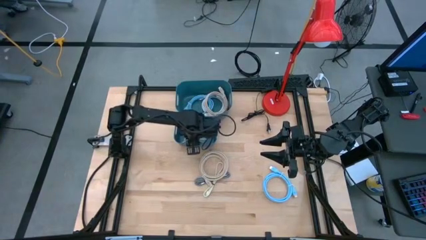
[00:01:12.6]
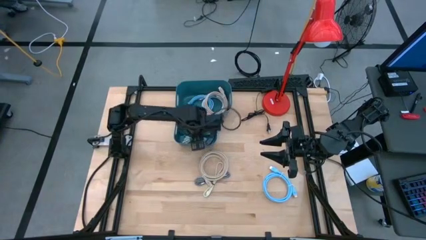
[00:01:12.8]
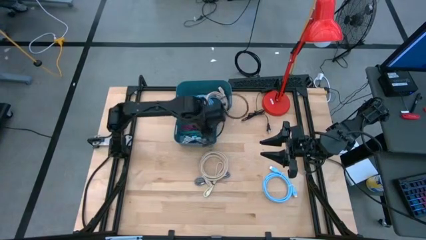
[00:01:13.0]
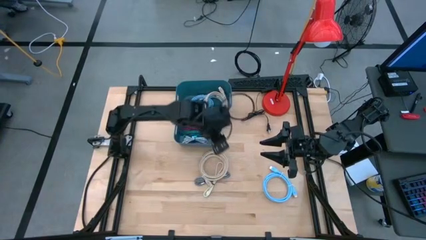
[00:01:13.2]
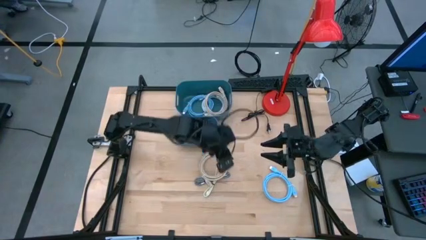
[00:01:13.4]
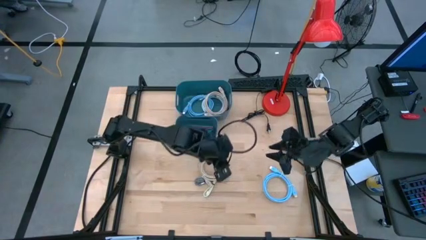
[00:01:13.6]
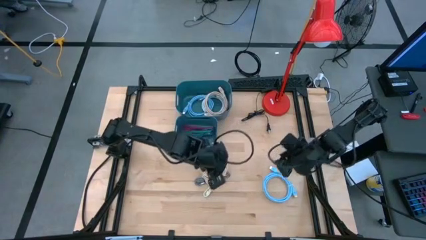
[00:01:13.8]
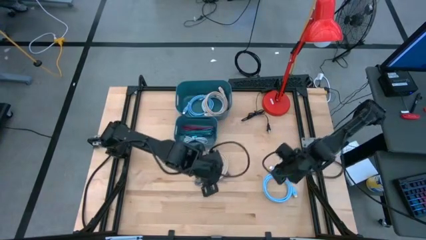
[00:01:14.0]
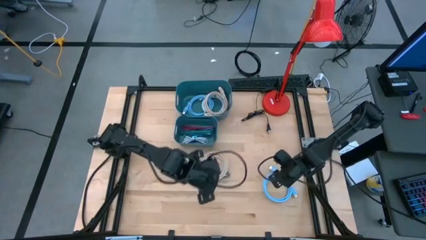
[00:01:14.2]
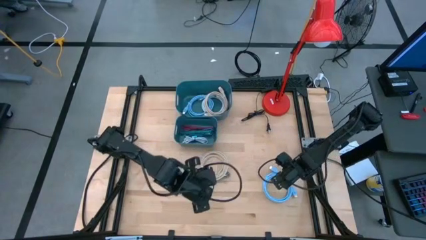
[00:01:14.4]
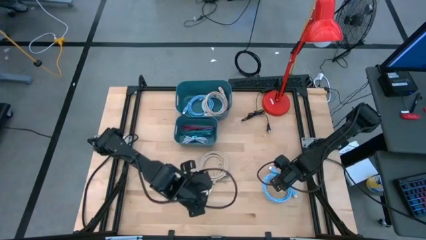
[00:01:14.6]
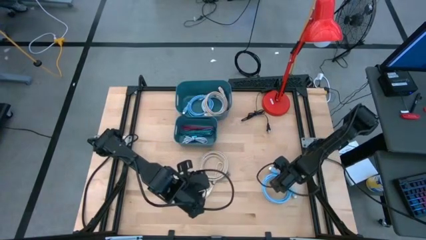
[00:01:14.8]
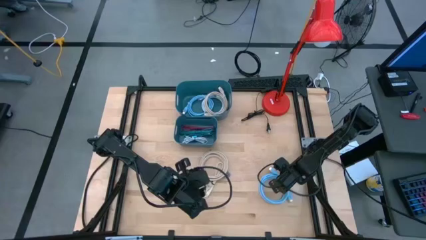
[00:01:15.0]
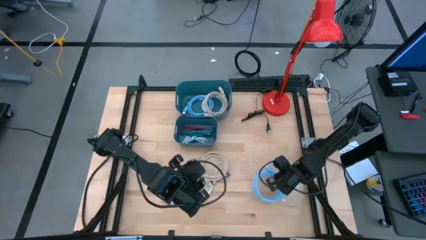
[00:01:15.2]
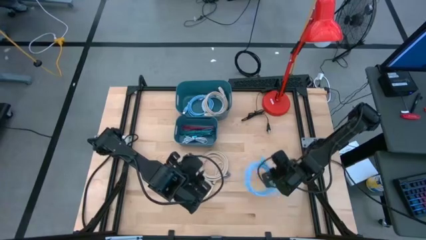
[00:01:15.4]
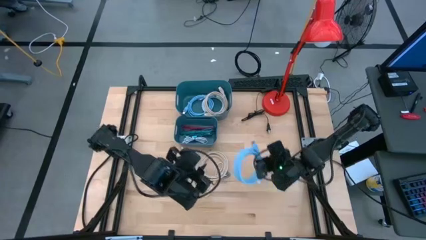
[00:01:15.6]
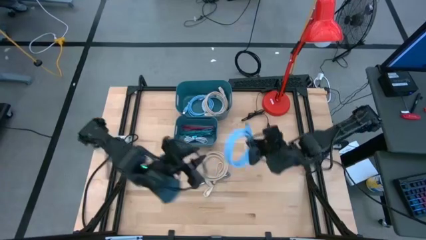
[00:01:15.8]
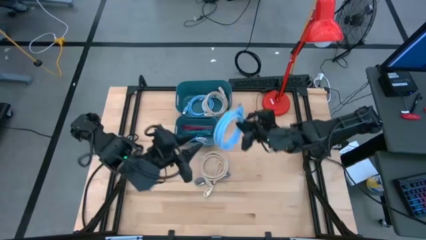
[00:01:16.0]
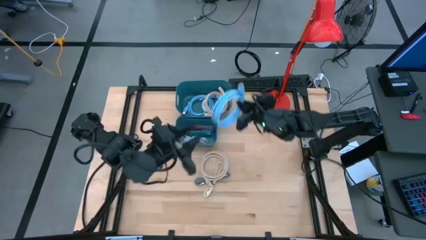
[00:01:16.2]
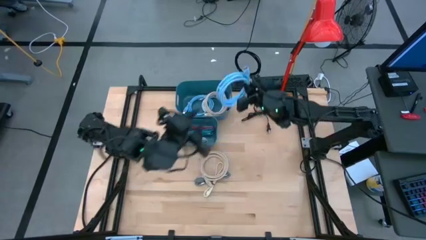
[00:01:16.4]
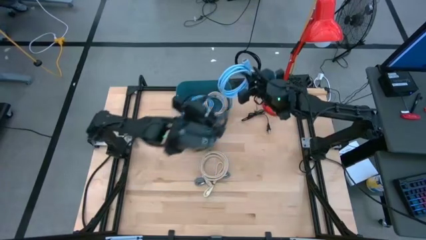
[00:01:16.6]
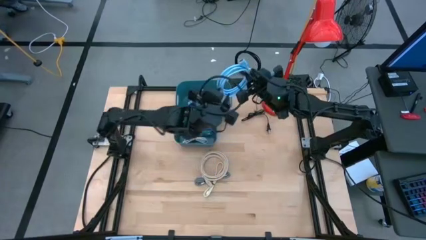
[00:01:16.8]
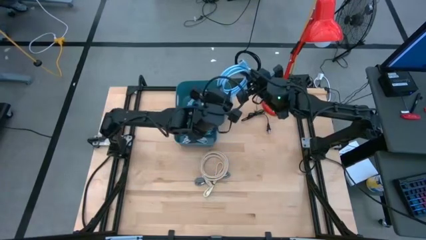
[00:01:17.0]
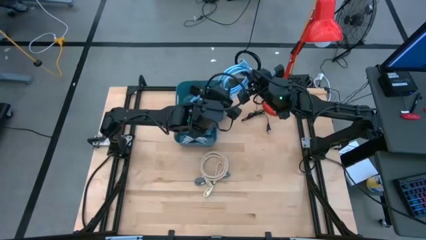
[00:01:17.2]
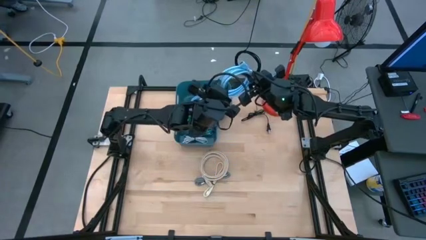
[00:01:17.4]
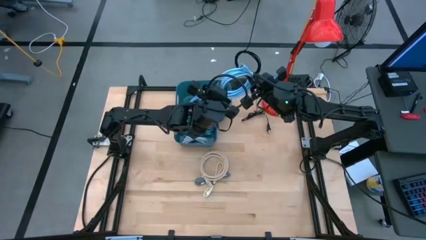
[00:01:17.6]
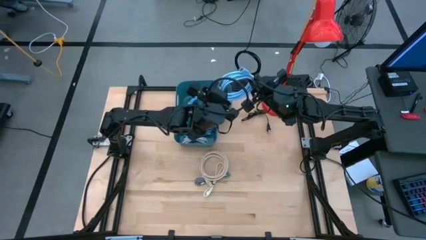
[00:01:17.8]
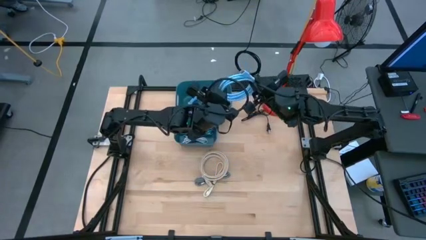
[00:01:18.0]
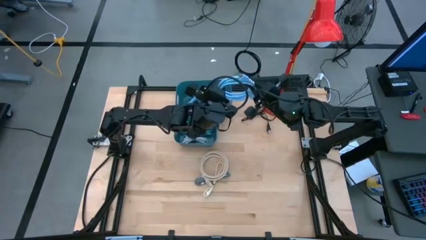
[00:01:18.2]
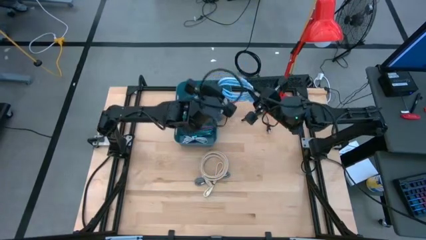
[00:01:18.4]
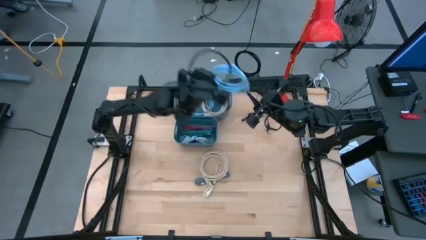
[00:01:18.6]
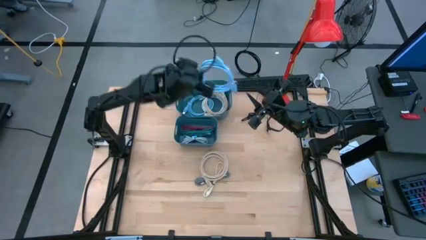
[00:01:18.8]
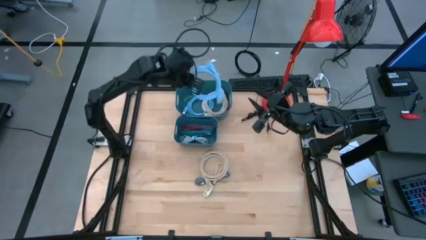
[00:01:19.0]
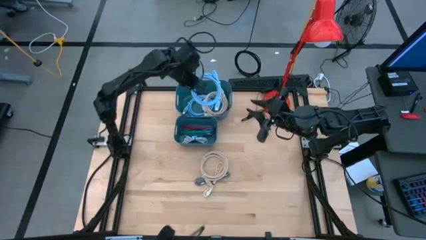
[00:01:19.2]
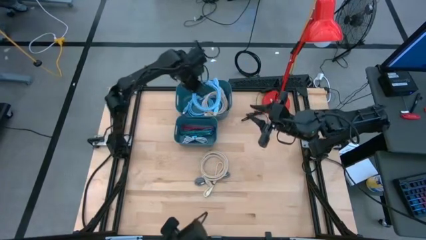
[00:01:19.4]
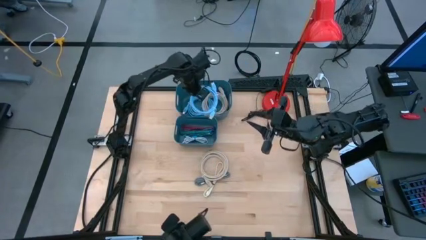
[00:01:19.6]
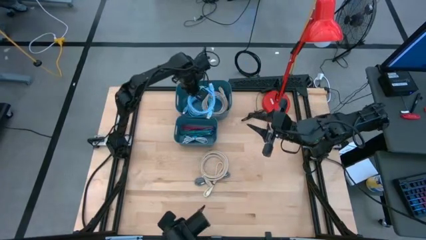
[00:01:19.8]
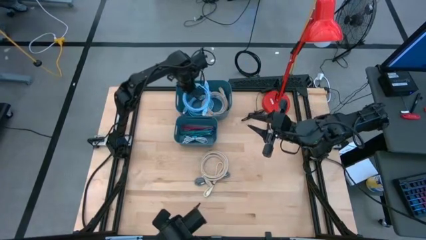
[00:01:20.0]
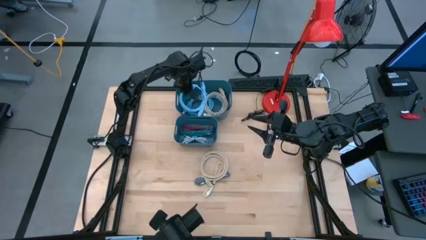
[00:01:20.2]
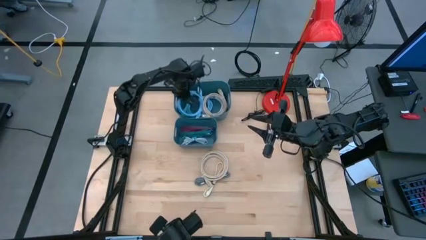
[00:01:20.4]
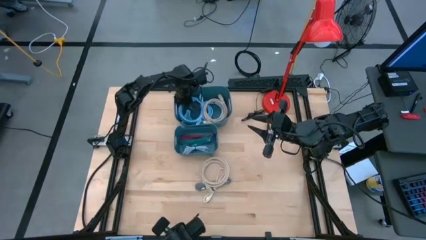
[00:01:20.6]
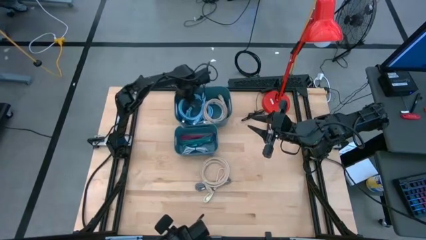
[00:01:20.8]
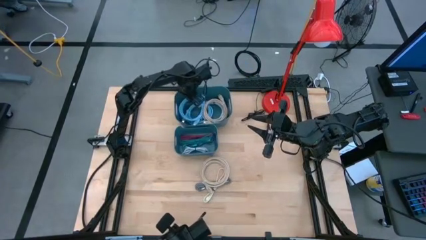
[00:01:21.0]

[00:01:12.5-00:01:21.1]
Task: Pick & Place USB Port
Put the blue HDMI cable into the top blue bin

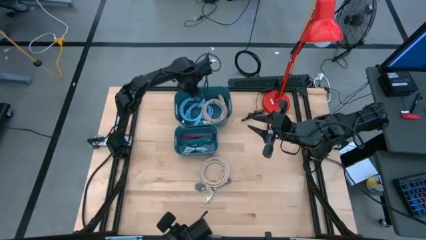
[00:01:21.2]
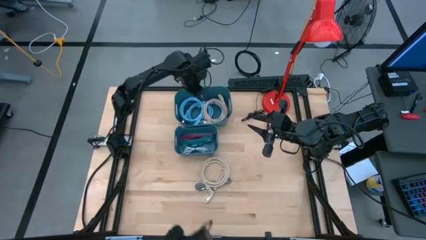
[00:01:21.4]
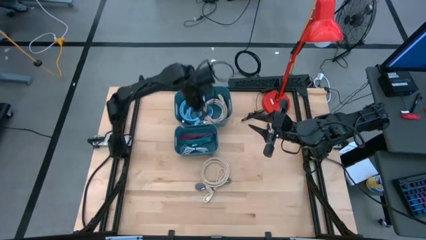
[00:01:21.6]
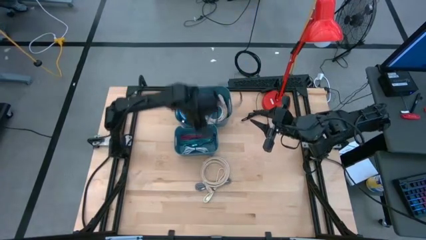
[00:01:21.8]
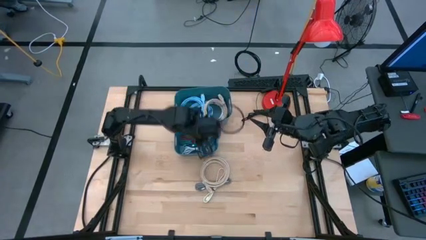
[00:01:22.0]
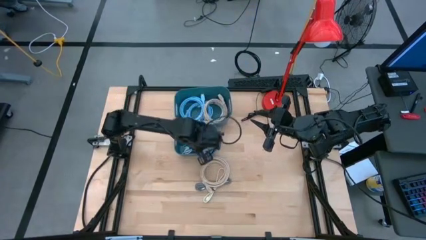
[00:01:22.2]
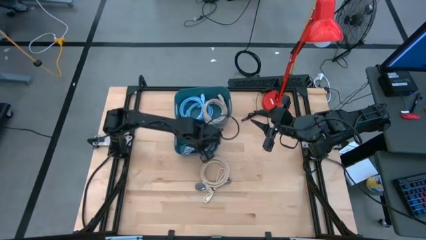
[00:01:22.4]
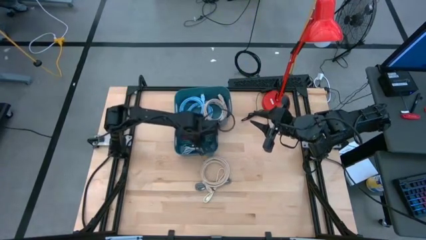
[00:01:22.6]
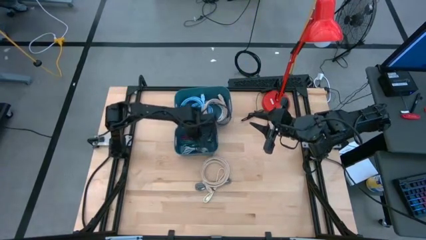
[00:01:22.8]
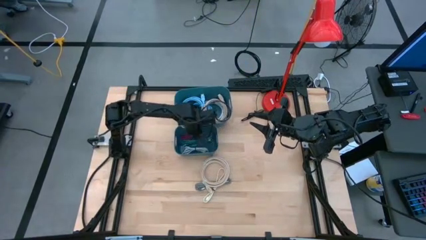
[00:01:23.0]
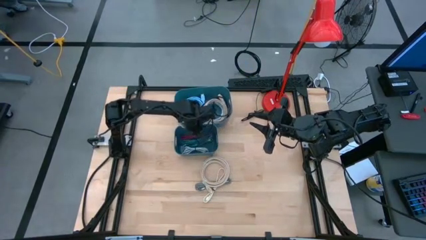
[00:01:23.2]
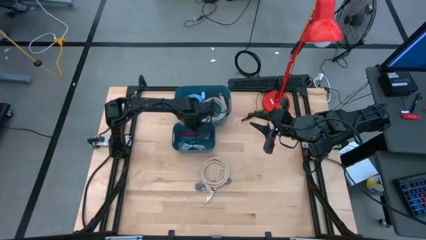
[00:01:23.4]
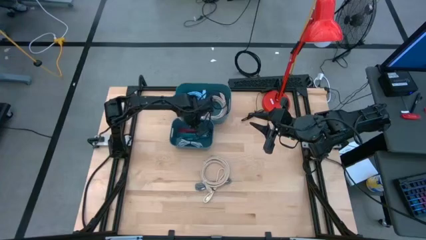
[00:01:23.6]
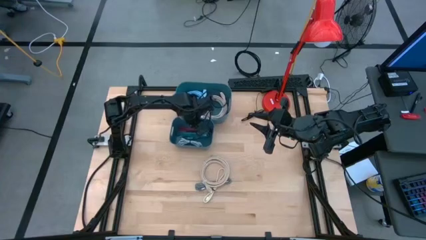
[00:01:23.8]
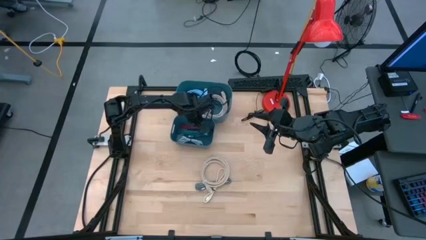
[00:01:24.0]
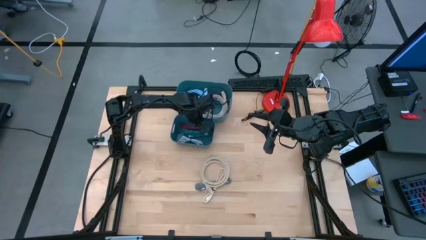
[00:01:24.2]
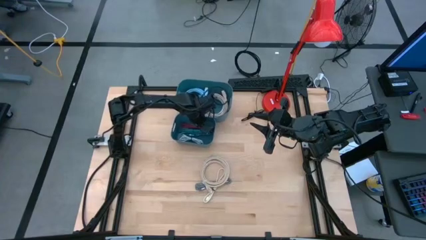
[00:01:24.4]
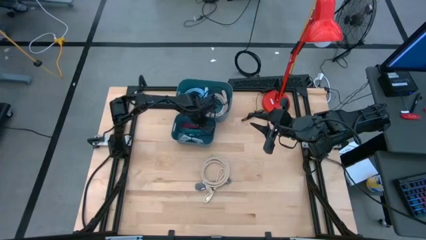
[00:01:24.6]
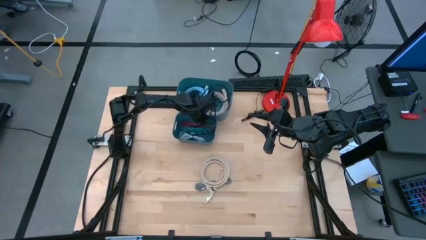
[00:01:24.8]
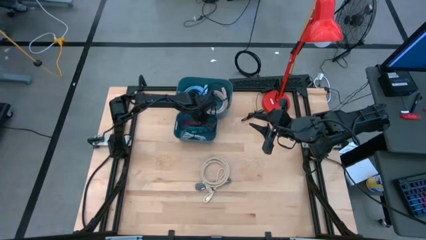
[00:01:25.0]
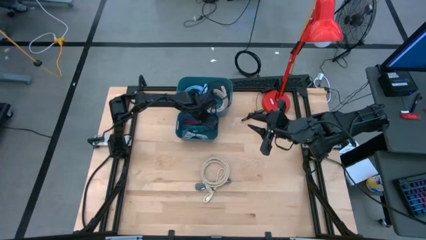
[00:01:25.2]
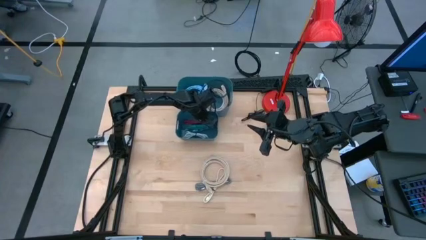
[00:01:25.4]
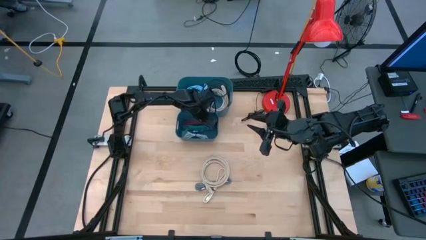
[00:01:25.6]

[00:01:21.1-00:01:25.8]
Adjust the blue bins
